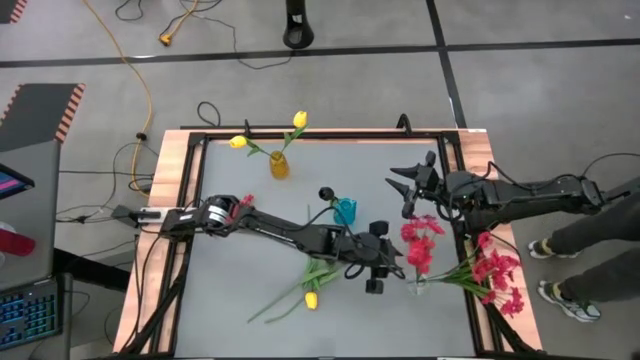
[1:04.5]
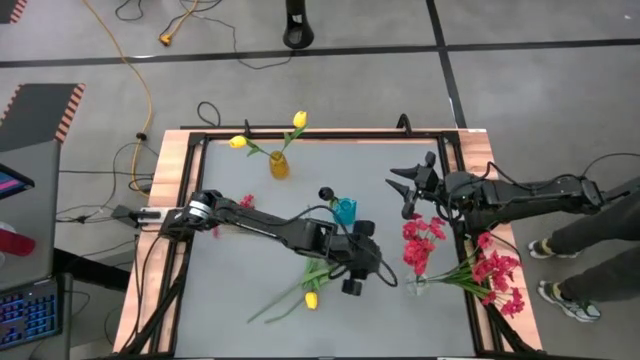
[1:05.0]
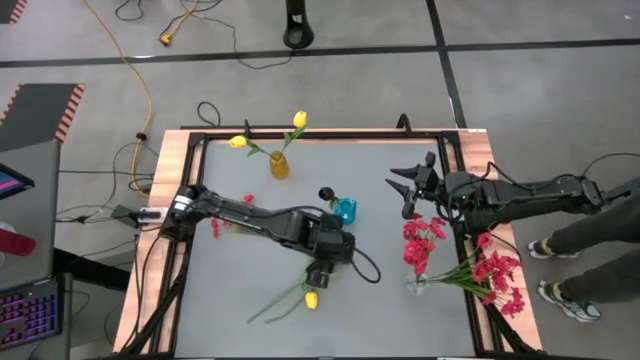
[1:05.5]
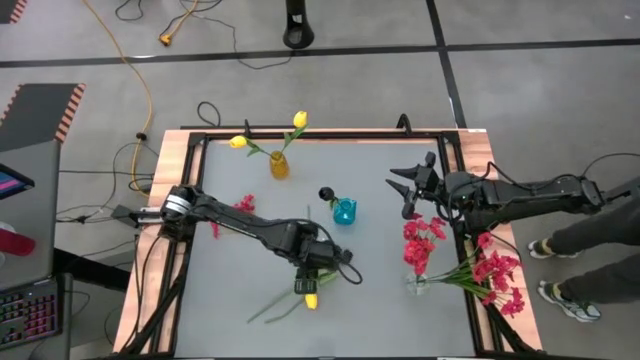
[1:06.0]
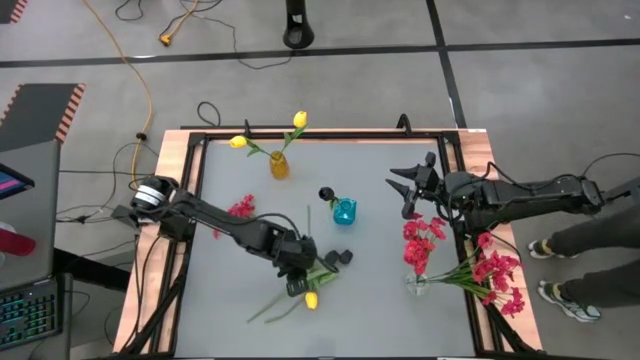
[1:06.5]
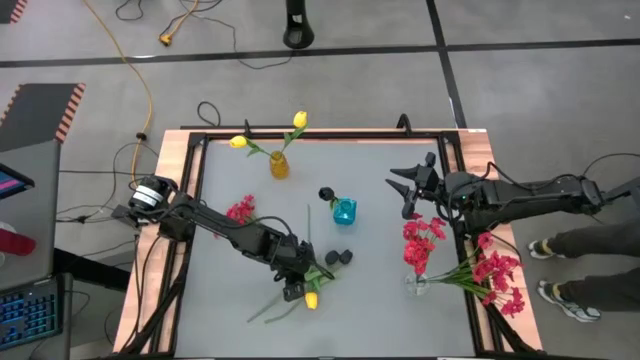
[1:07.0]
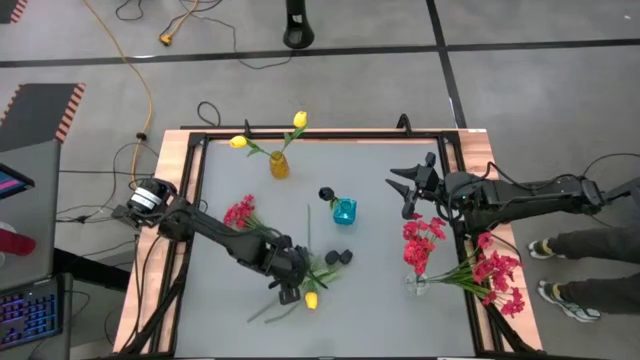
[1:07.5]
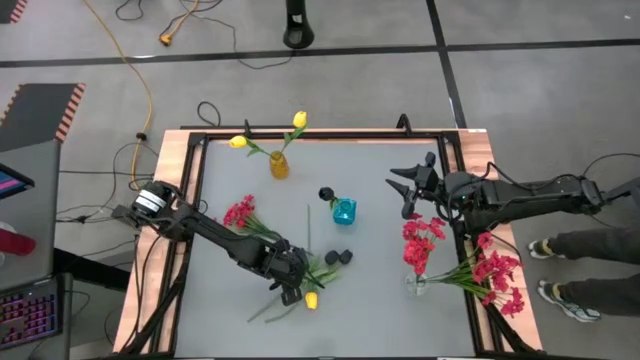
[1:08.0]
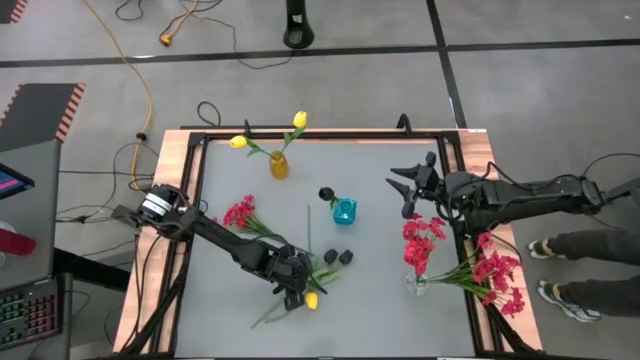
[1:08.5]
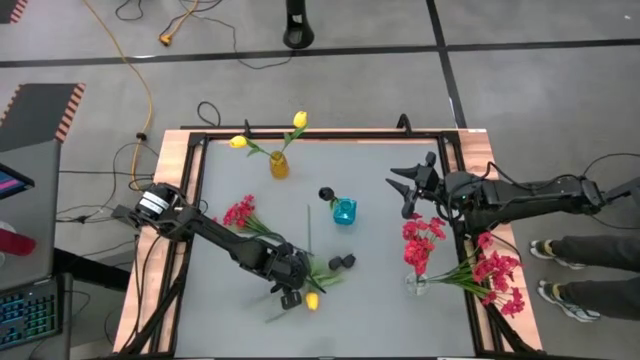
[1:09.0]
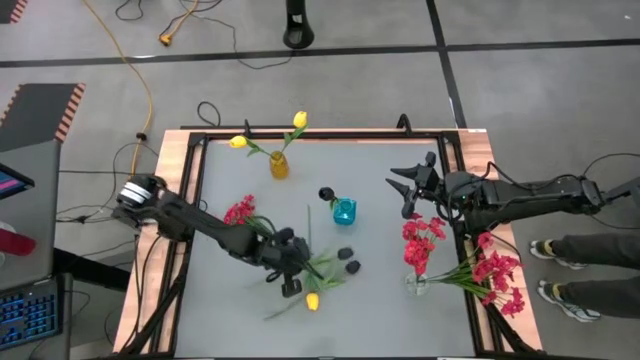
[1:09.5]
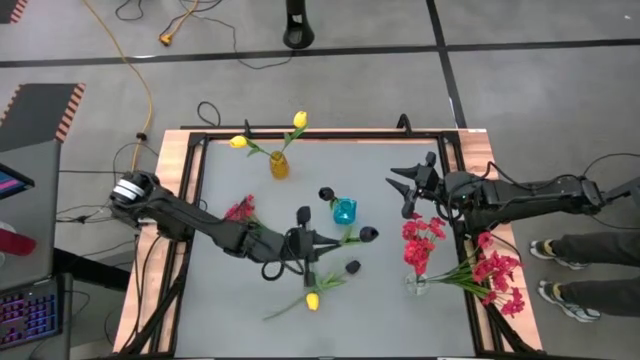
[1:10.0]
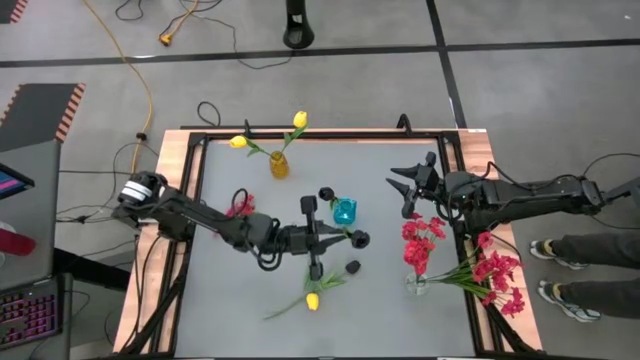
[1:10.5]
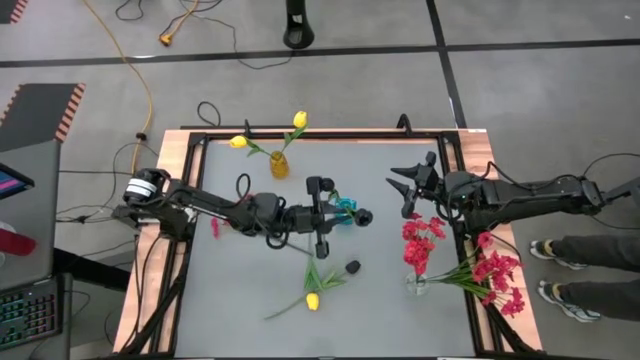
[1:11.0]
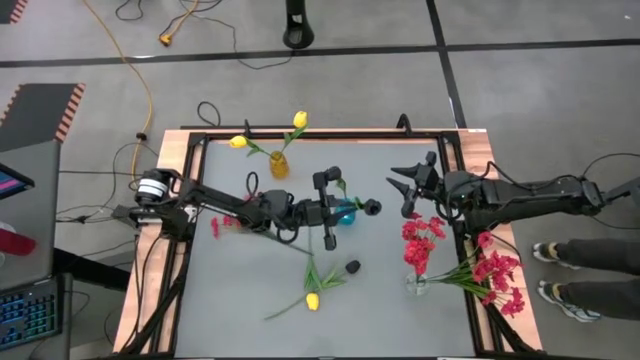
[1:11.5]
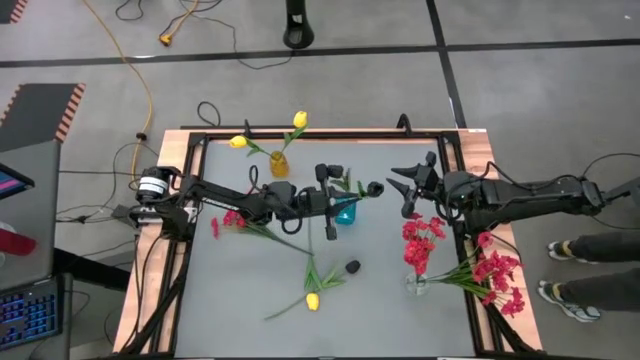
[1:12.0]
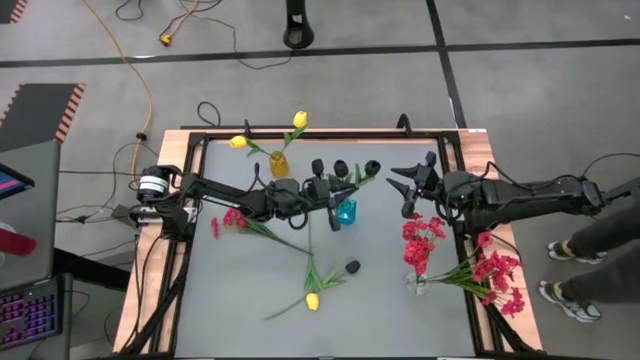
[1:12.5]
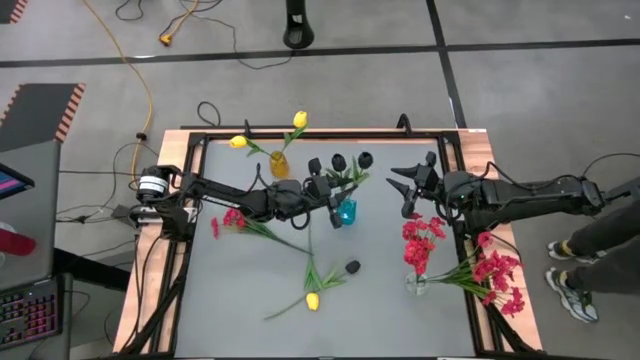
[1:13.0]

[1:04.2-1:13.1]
Task: Sort flowers into vase by color
Put the left black flower into the blue vase

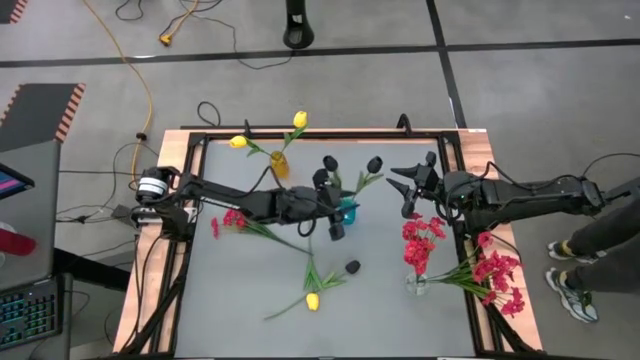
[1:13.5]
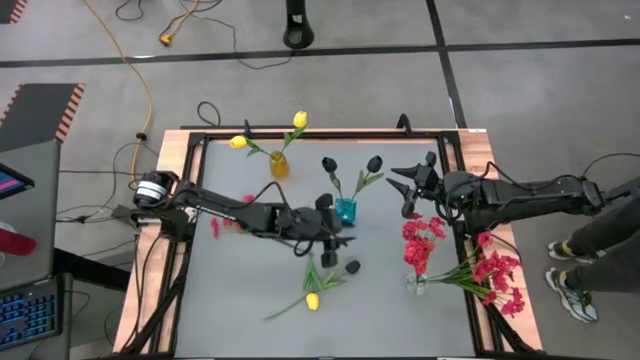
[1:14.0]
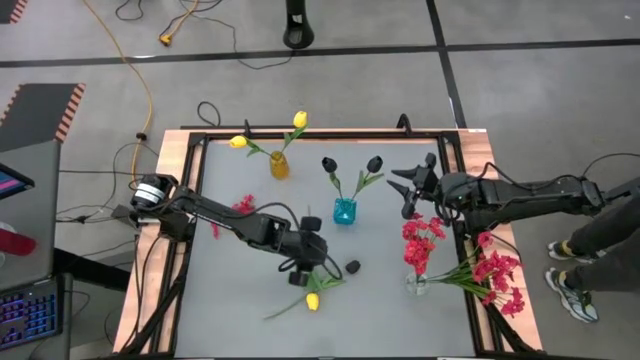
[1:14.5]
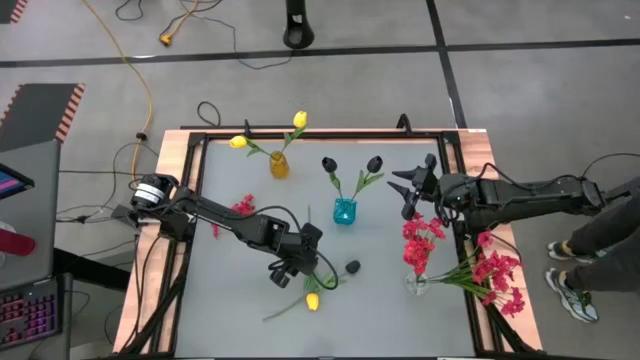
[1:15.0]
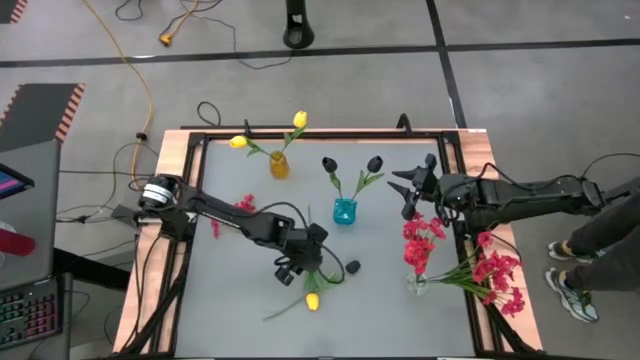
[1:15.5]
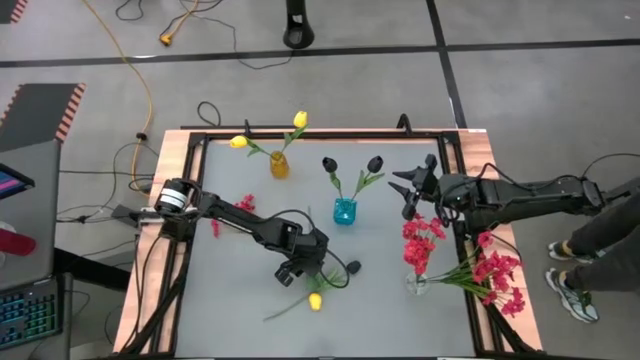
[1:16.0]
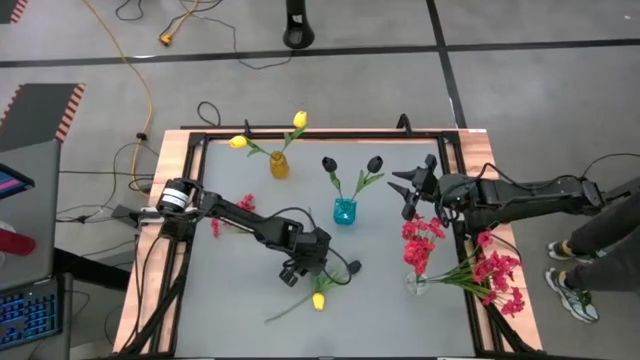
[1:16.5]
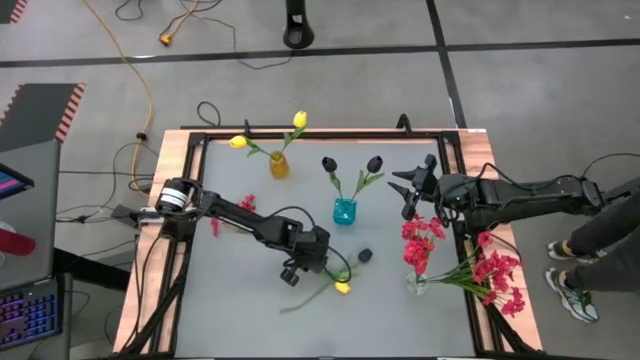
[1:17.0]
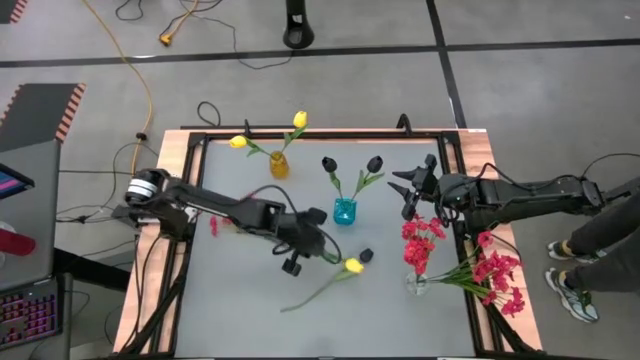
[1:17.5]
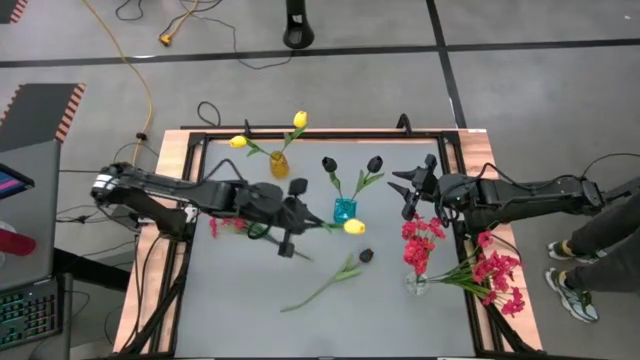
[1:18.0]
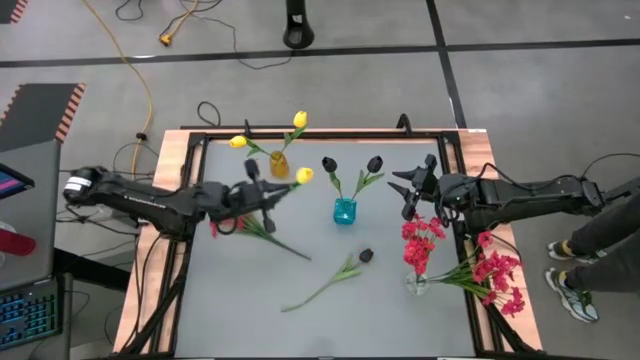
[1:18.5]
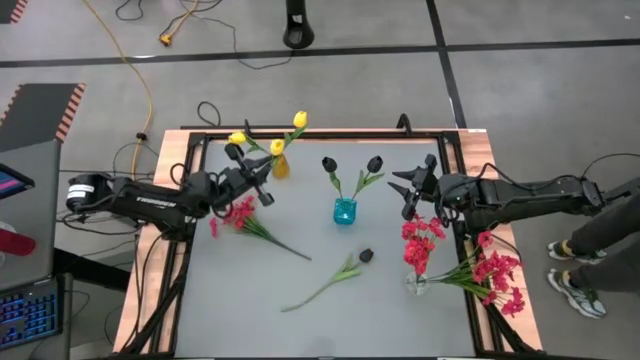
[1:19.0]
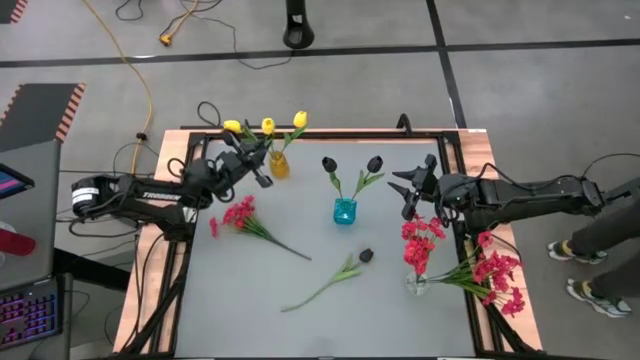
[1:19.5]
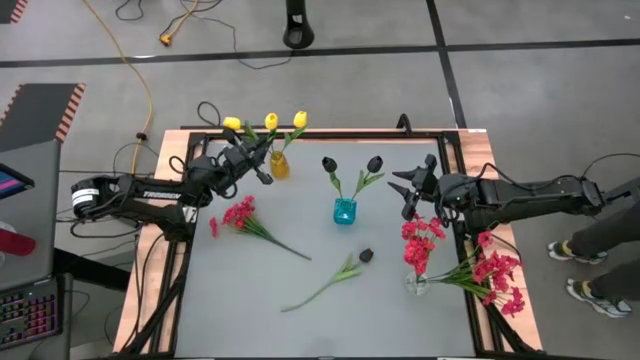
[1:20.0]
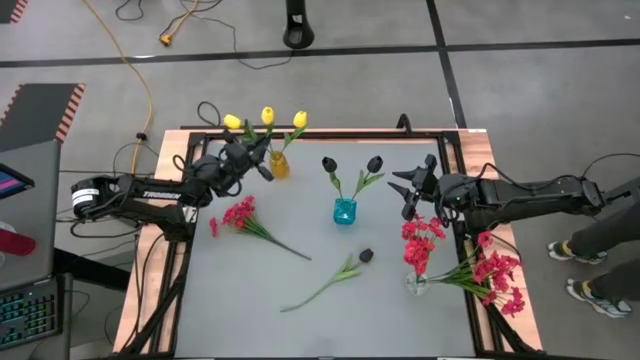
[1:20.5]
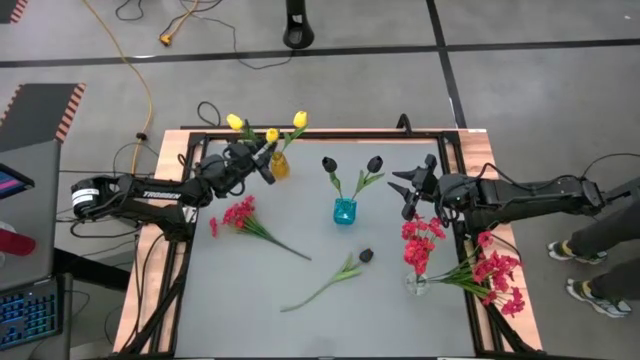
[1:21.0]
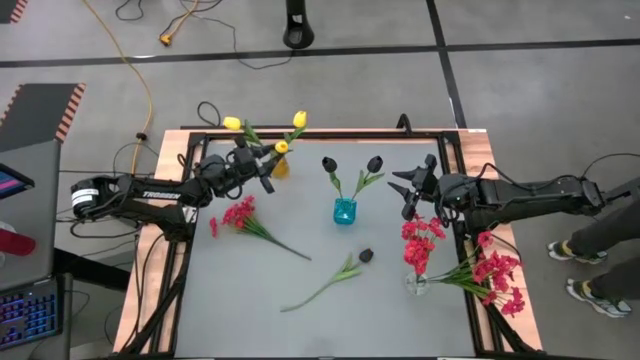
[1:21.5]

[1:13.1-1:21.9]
Put the yellow flower into the yellow vase

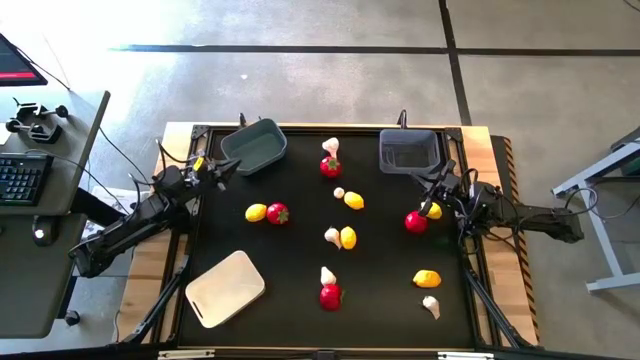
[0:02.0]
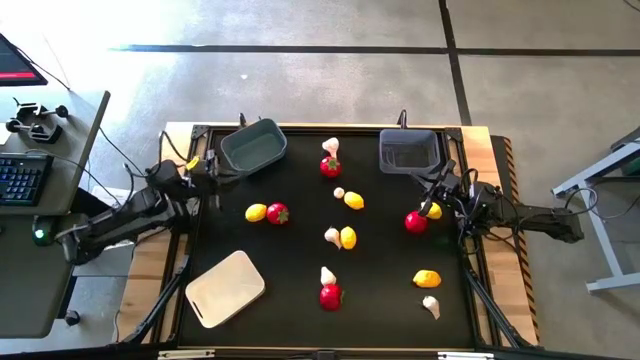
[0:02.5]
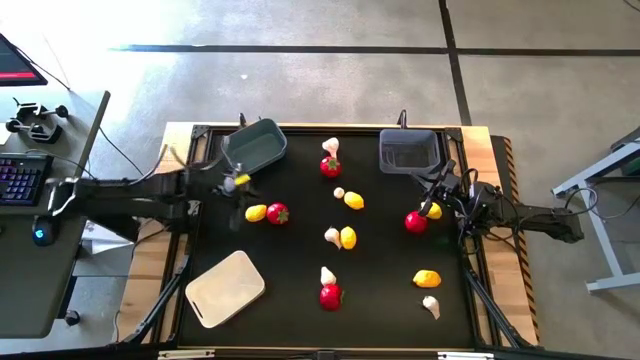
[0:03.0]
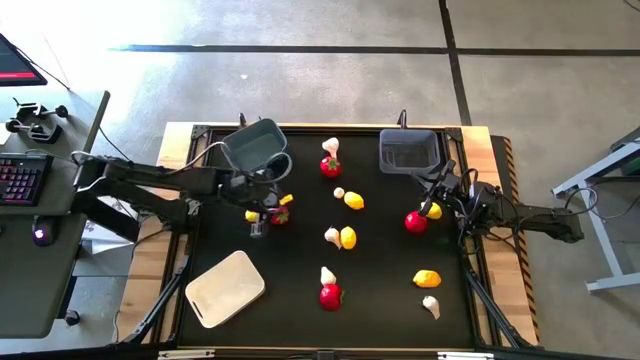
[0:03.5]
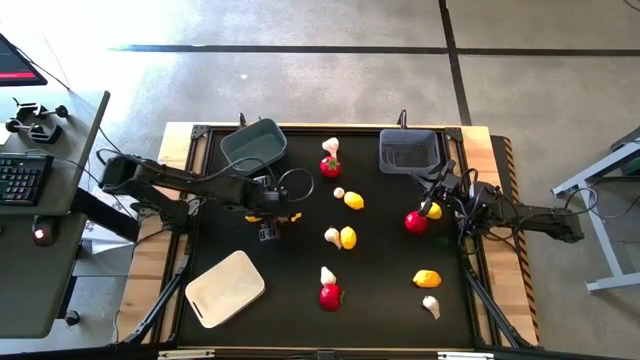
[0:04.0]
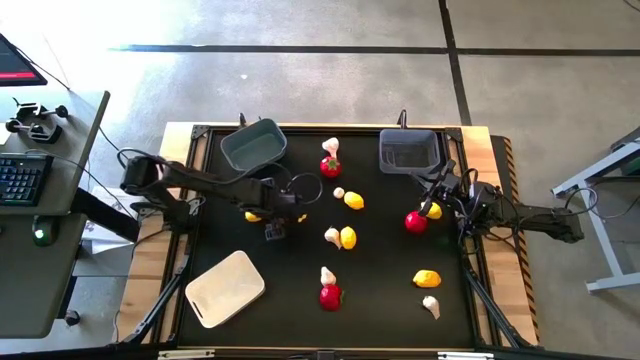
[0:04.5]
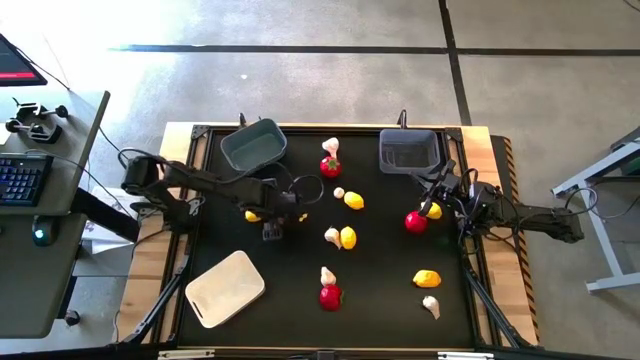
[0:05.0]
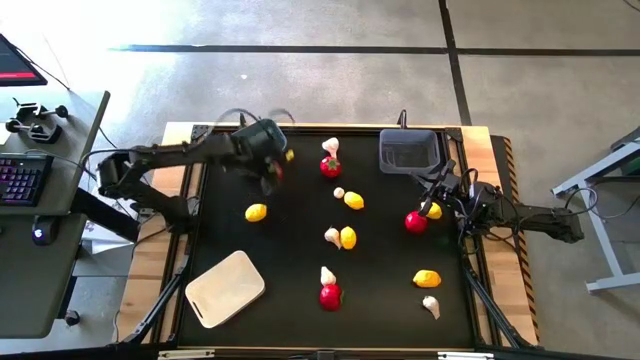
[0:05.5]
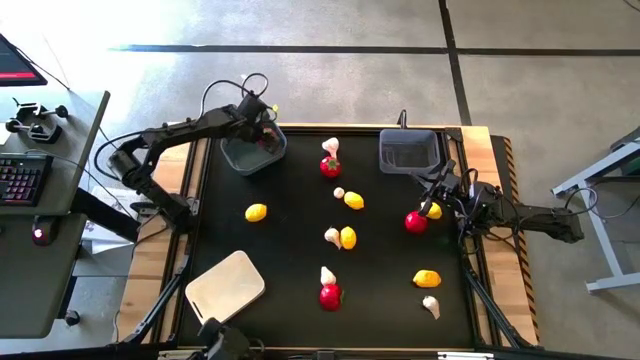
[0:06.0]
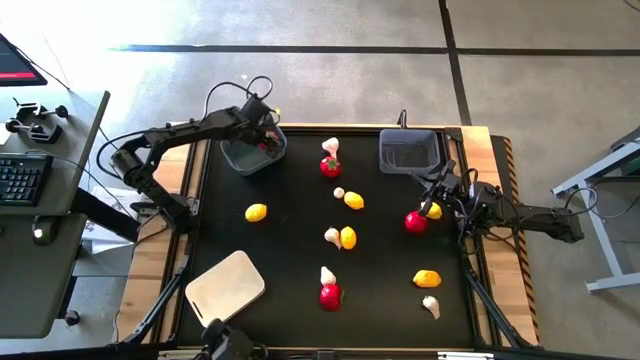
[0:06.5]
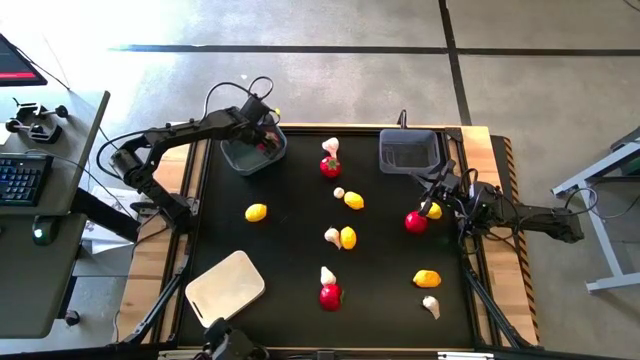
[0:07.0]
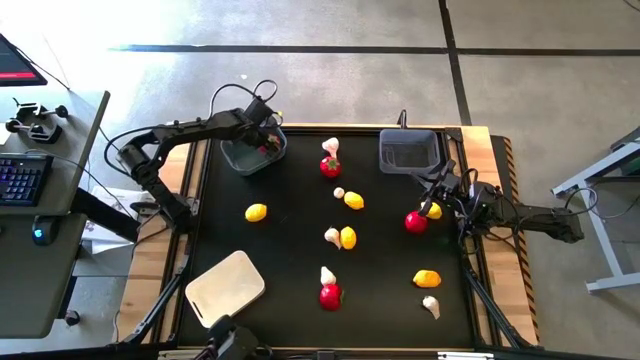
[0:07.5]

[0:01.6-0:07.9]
Task: Sort produce into baskets
Put the red tomato into the blue bin
